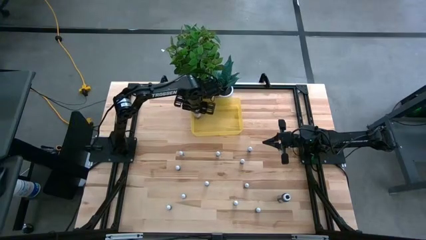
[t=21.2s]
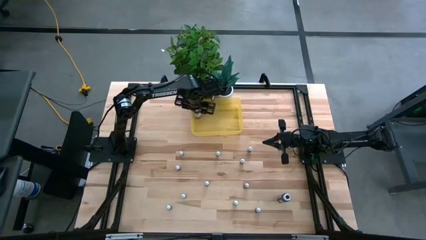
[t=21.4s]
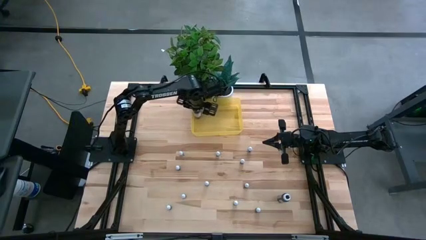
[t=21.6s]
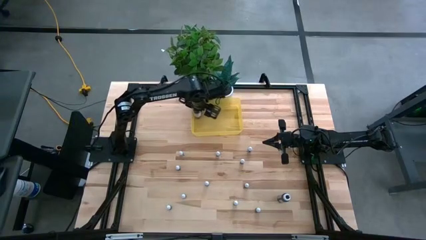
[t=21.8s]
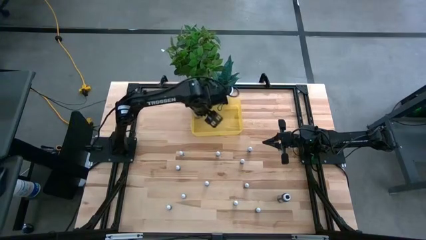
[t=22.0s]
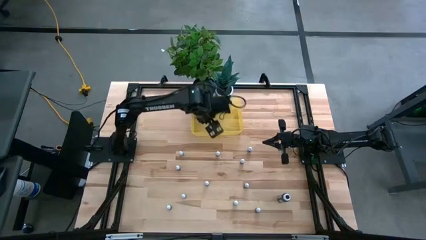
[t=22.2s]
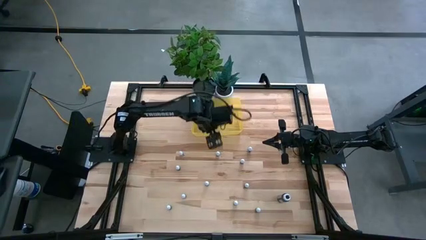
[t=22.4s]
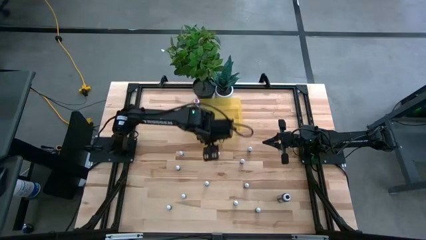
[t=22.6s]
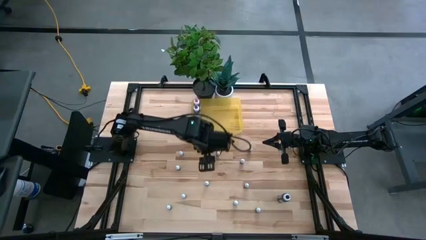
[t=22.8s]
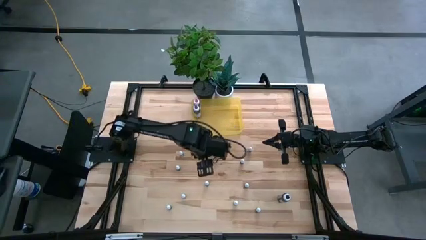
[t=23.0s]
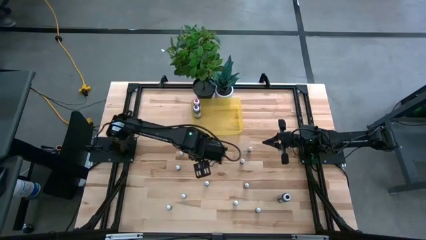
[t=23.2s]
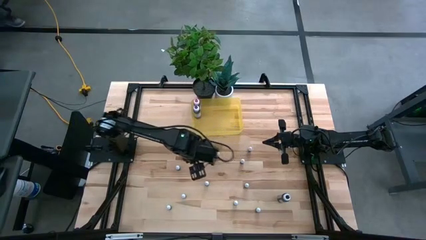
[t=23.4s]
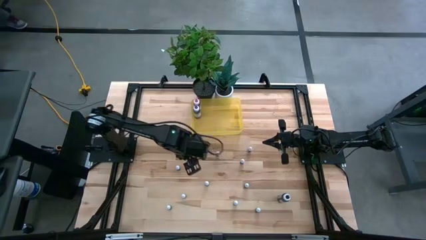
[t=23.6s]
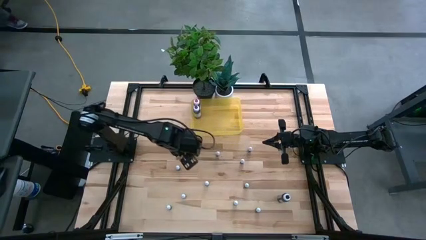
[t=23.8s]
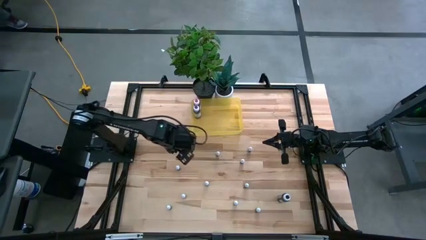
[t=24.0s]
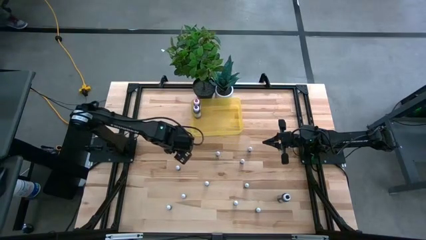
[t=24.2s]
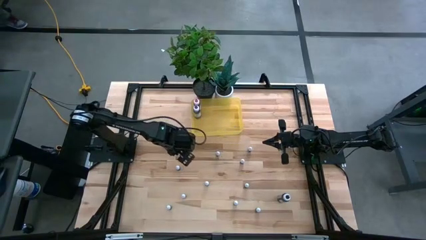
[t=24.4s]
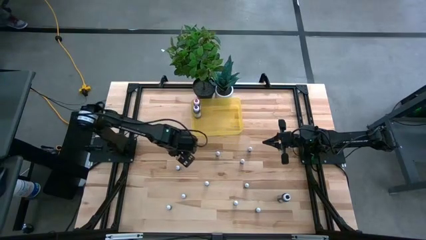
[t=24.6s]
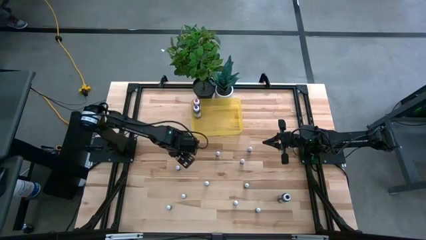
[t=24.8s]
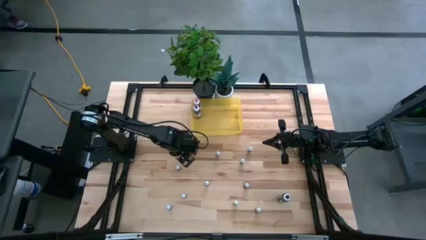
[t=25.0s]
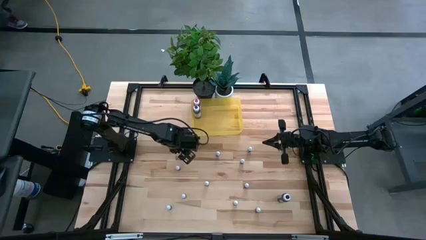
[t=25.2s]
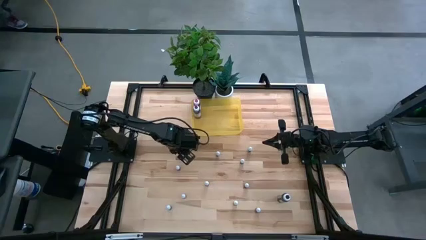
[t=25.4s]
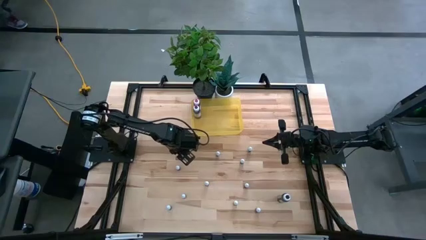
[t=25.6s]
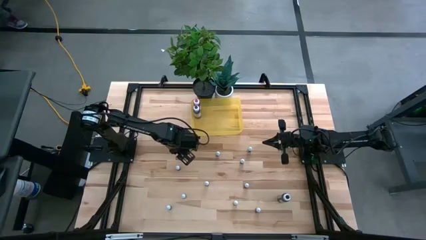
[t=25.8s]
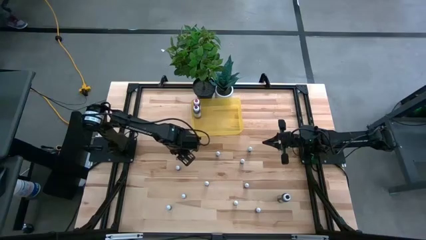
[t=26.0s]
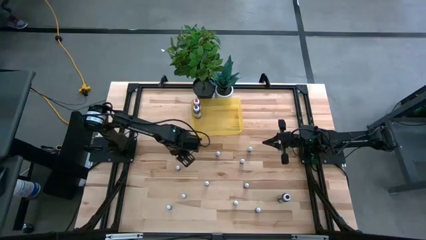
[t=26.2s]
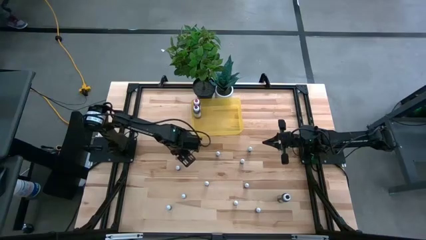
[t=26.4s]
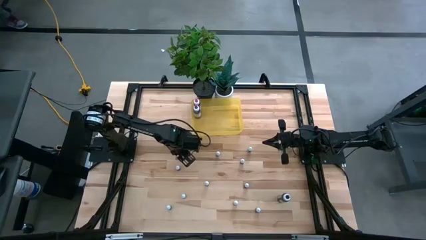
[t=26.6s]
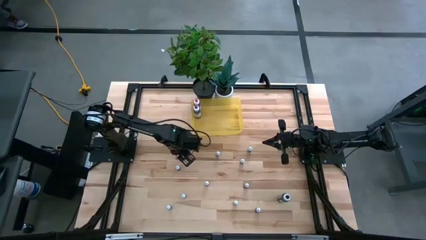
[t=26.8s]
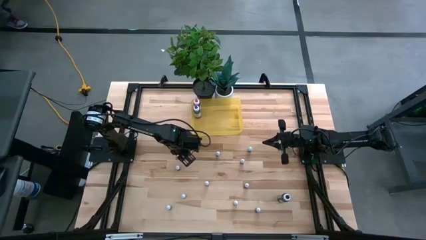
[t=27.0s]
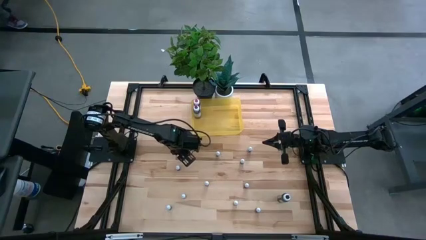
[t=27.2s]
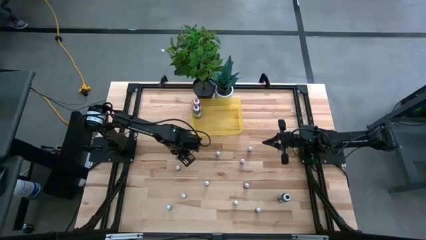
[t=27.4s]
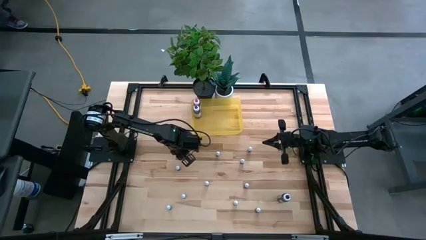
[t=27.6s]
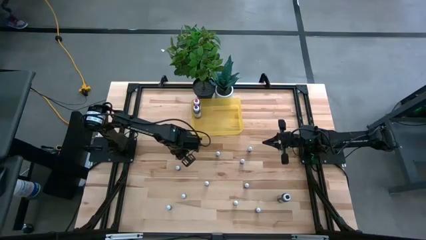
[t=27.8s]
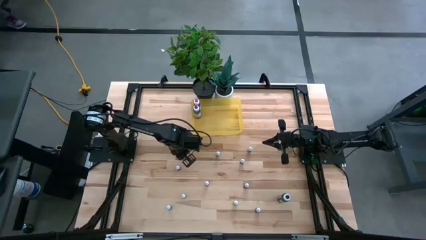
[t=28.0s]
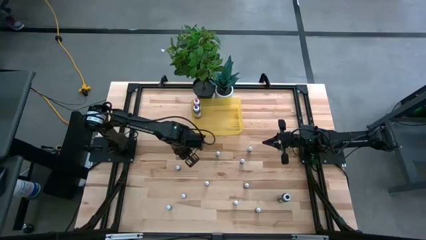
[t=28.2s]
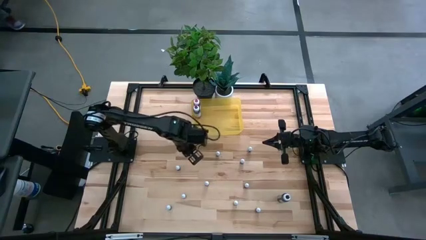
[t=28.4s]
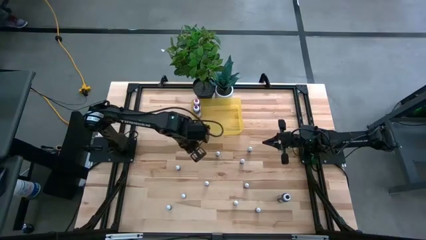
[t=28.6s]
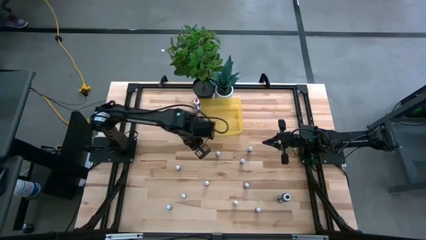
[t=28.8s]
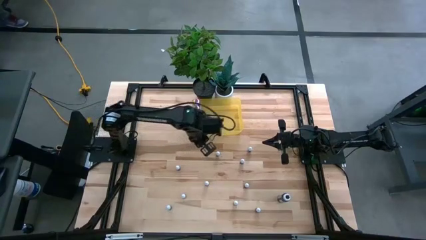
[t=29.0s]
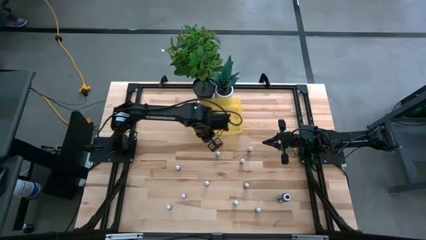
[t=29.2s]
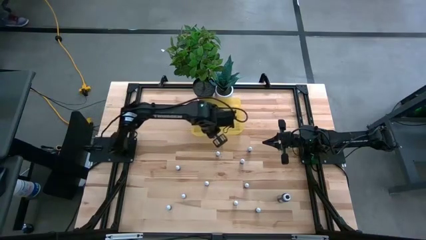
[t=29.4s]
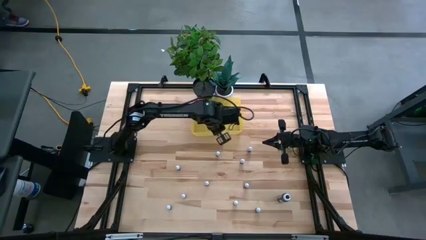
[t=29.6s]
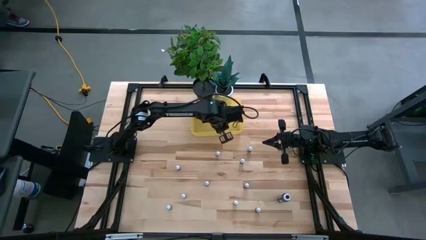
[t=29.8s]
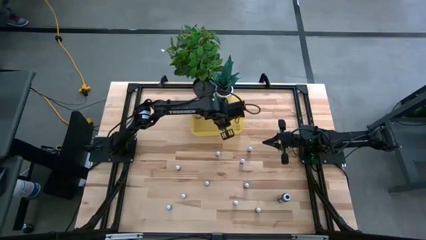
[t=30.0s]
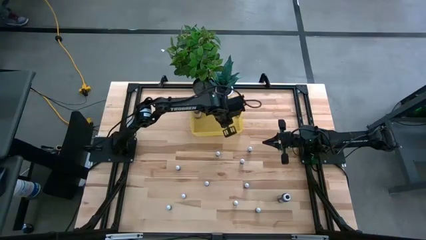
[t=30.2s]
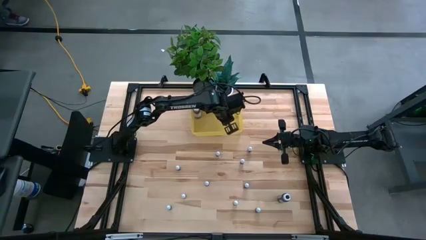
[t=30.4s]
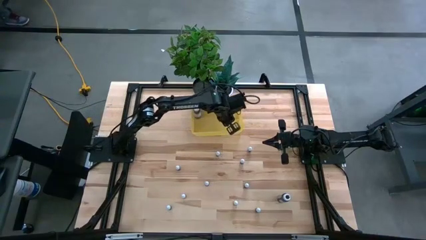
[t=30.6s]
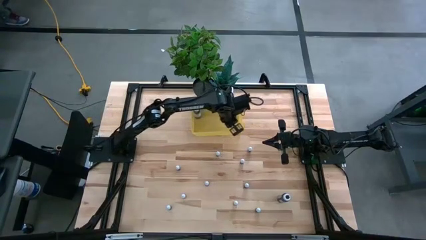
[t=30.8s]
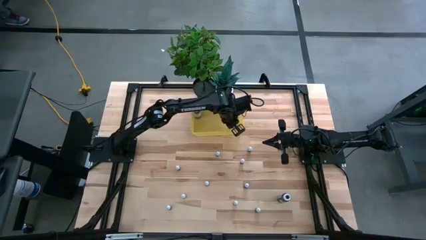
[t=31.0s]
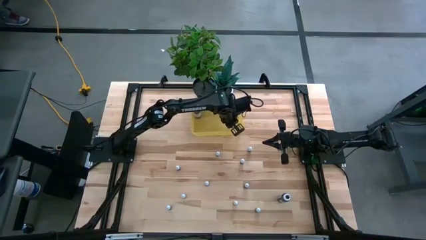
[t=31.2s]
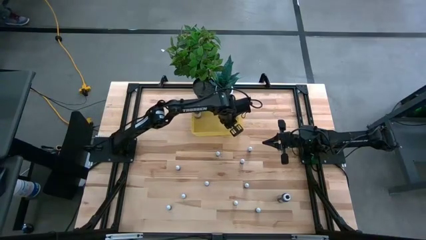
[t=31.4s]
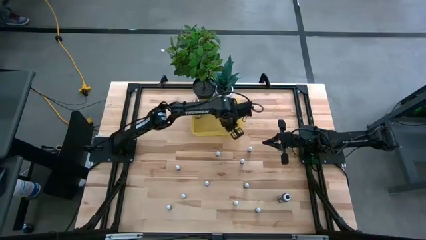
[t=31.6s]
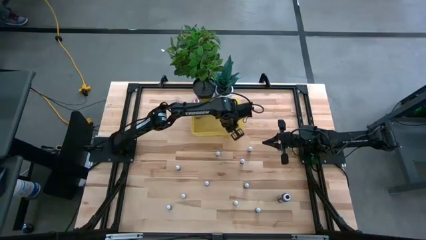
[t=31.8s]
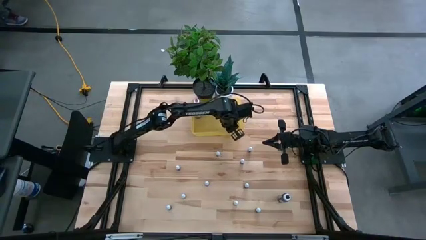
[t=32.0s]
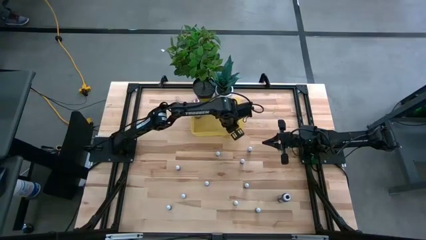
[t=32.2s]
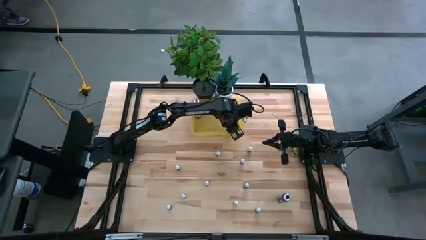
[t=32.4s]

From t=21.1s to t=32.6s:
Task: Pick & Place food coloring
Put the top left small black food coloring bottle into the yellow bin
